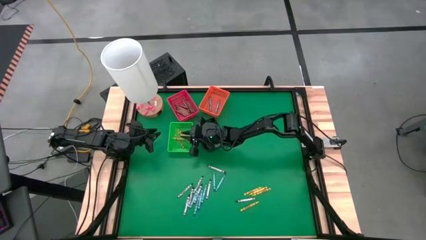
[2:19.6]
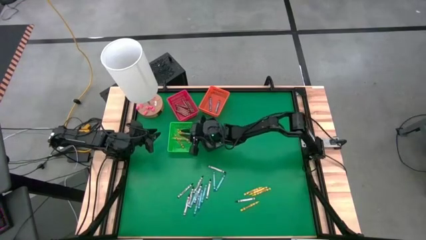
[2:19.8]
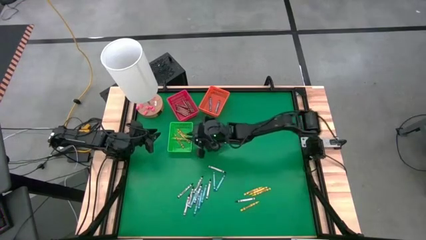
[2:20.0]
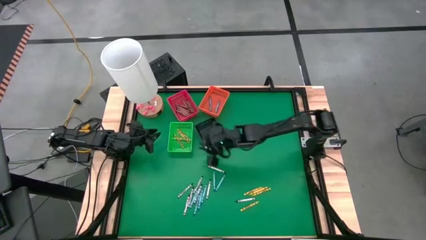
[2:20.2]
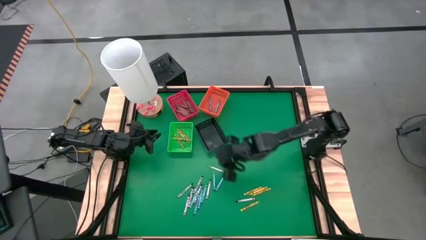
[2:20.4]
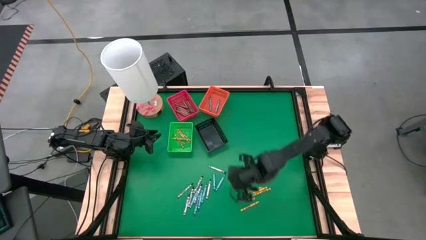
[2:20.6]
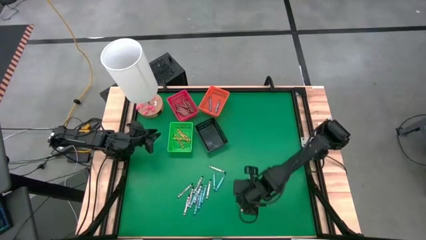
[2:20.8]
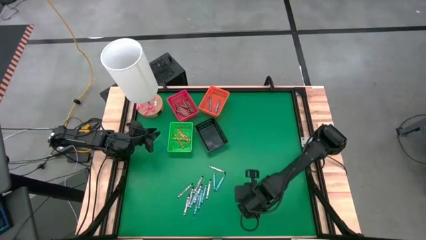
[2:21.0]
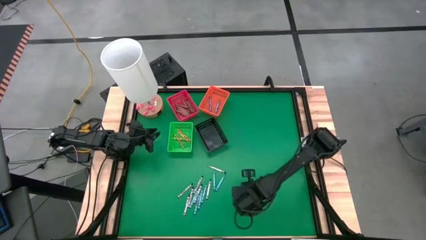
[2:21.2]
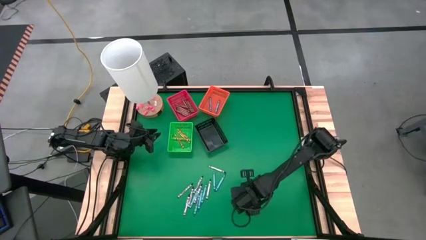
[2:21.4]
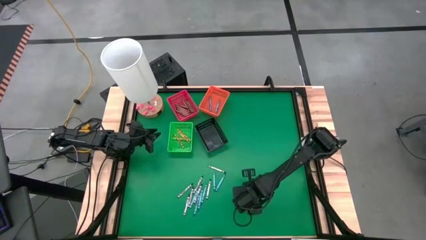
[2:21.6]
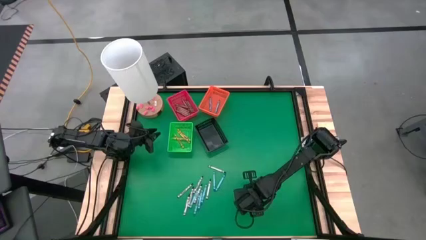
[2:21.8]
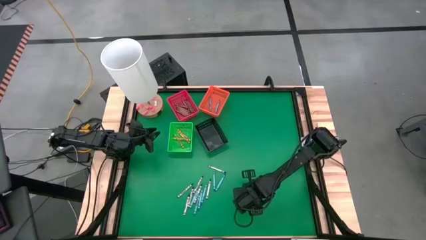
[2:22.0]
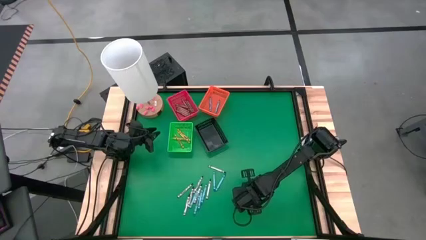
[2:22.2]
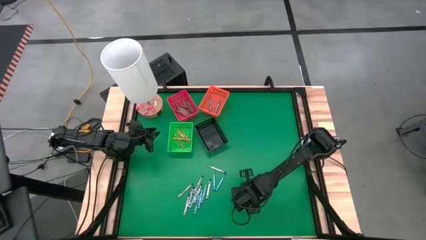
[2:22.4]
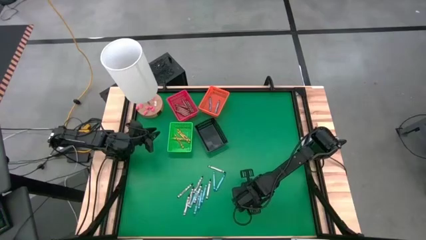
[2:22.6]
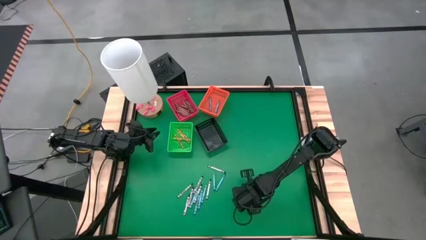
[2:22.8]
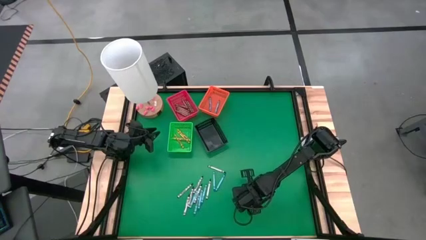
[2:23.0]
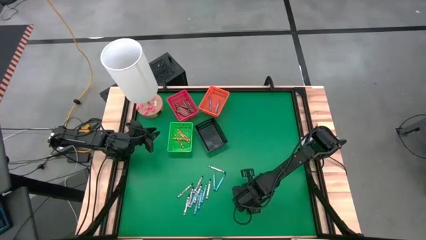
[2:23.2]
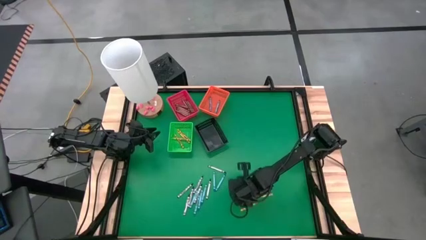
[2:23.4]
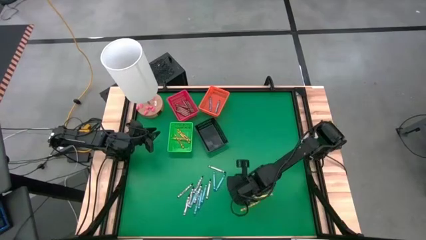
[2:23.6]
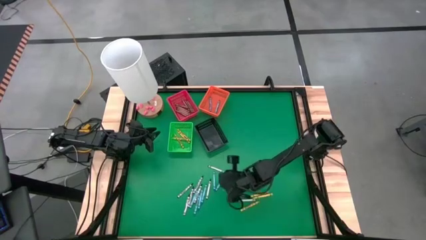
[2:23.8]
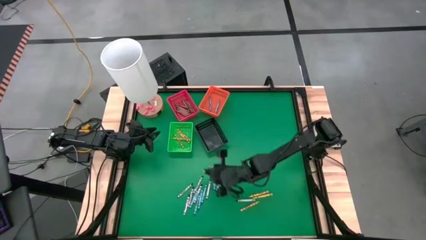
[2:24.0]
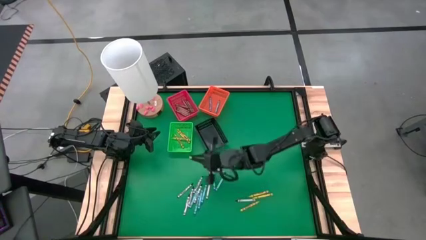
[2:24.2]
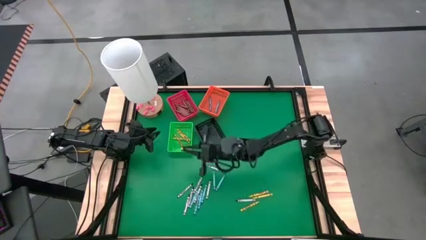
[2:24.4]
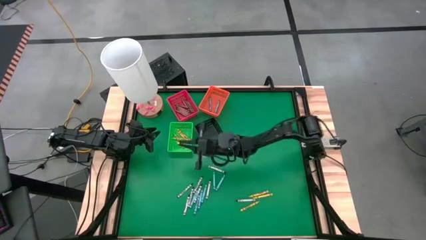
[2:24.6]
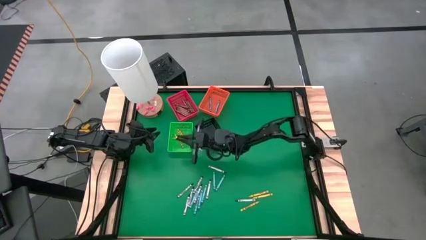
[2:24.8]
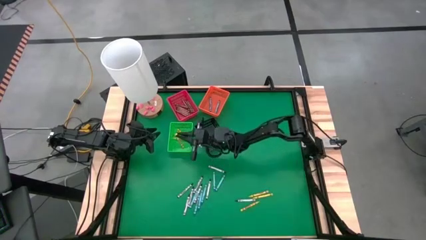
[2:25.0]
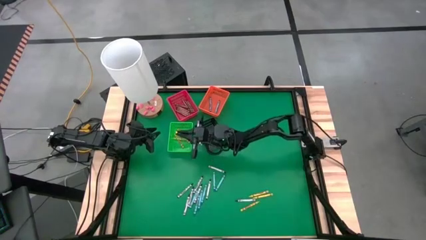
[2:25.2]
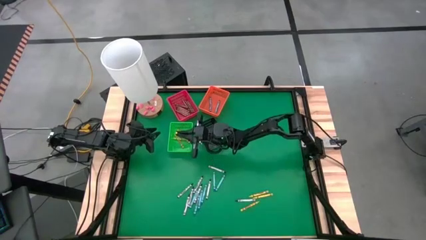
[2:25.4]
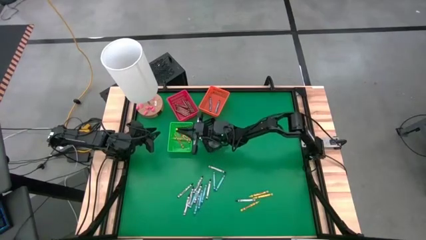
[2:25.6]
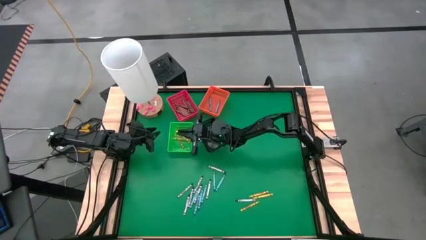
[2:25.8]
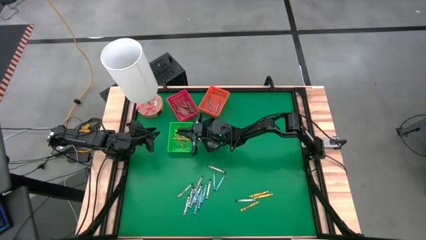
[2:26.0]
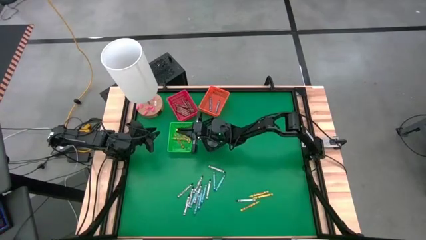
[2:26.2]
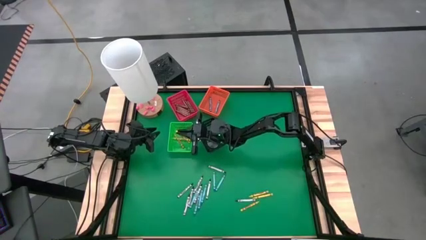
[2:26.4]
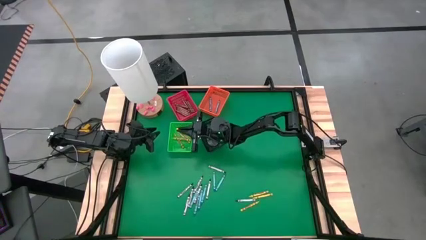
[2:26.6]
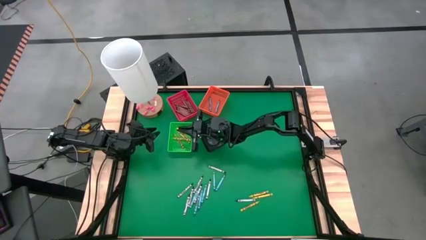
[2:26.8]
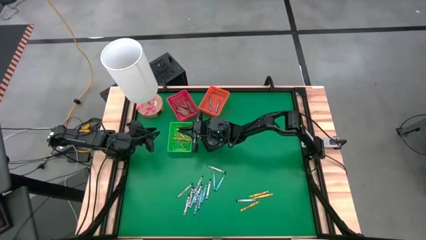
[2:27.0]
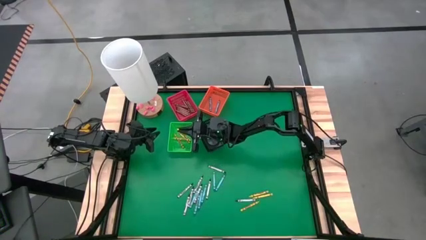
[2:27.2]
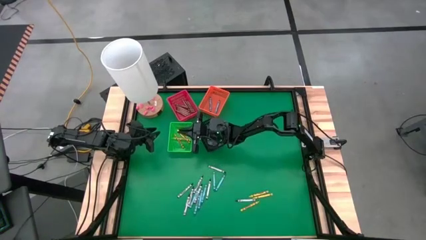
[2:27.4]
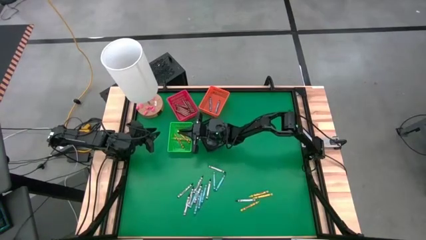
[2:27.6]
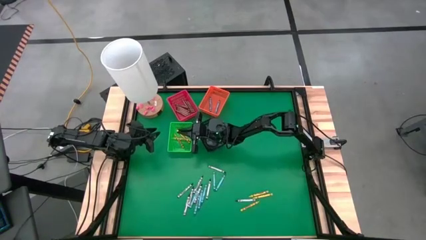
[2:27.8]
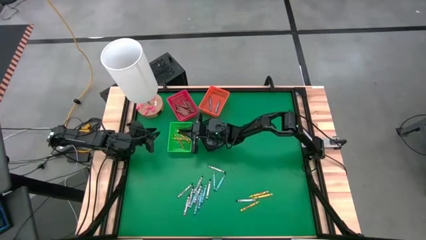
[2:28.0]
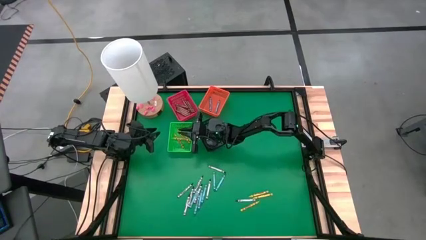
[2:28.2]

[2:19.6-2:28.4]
Task: Sort crayons
Put the yellow crayon into the green bin

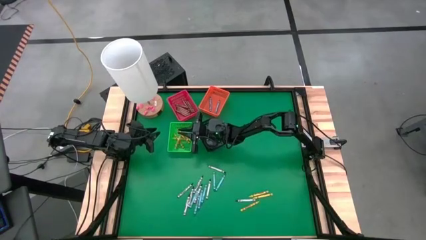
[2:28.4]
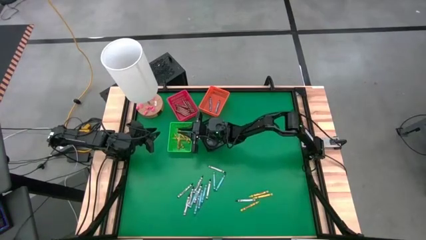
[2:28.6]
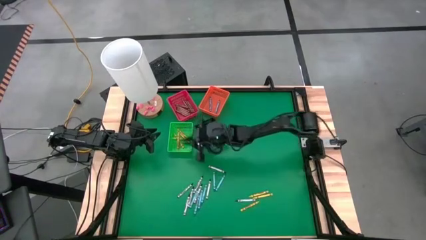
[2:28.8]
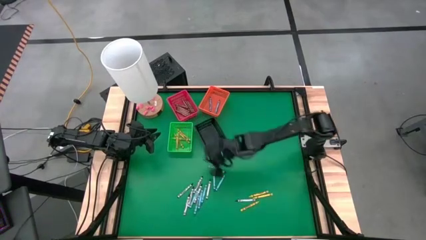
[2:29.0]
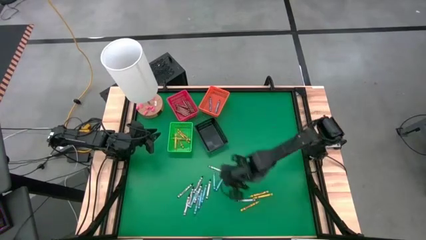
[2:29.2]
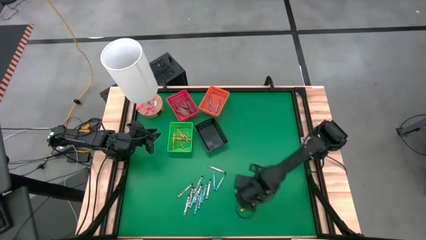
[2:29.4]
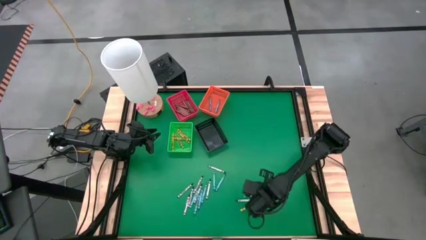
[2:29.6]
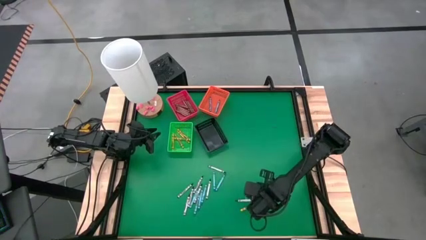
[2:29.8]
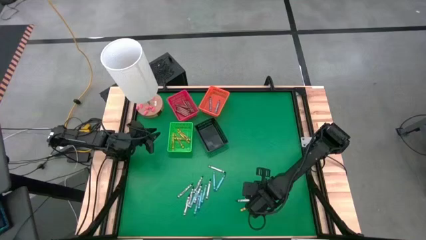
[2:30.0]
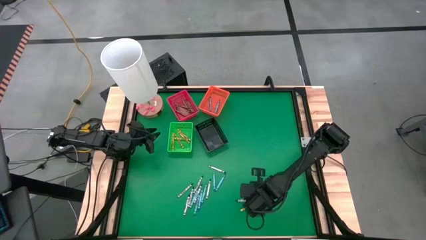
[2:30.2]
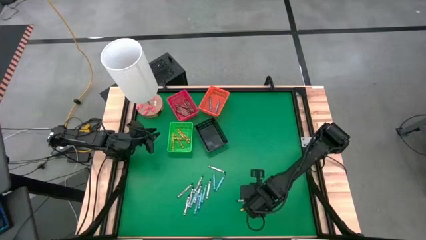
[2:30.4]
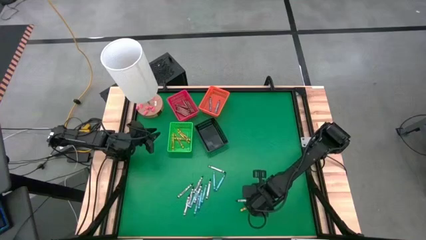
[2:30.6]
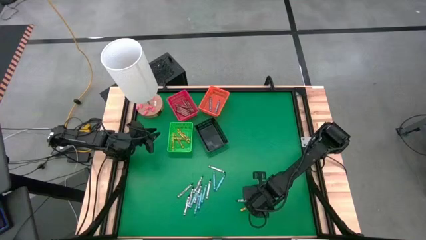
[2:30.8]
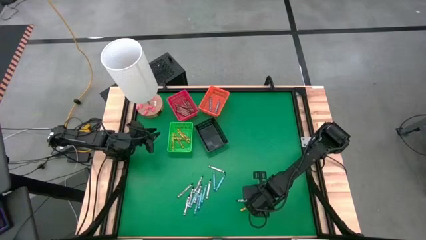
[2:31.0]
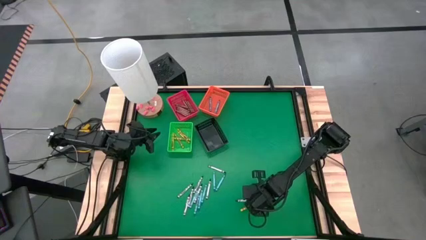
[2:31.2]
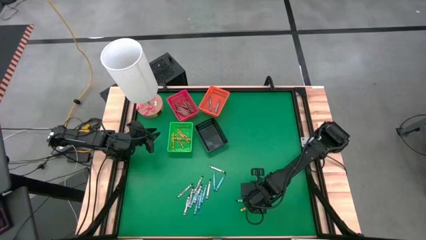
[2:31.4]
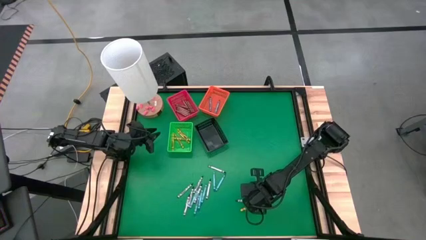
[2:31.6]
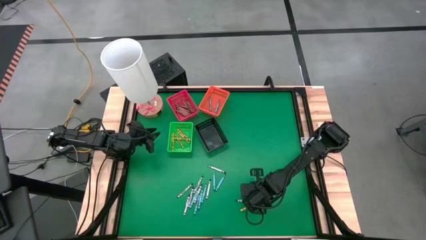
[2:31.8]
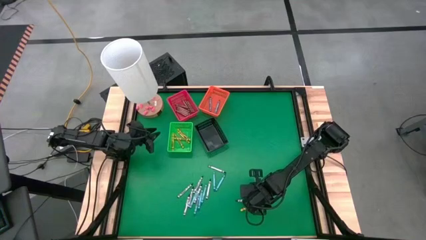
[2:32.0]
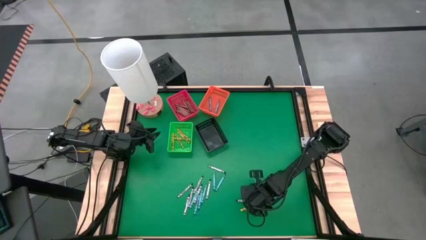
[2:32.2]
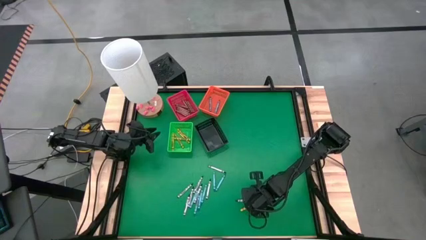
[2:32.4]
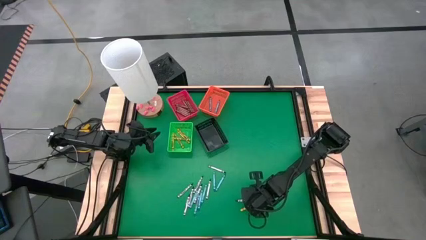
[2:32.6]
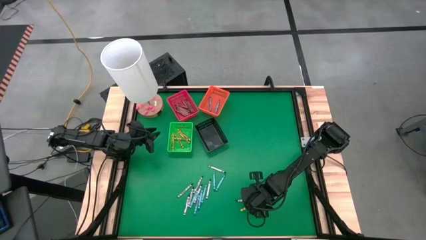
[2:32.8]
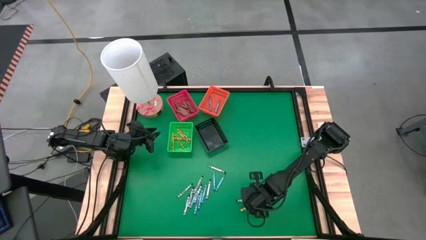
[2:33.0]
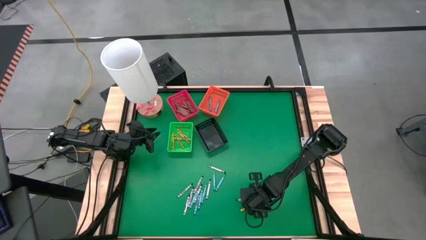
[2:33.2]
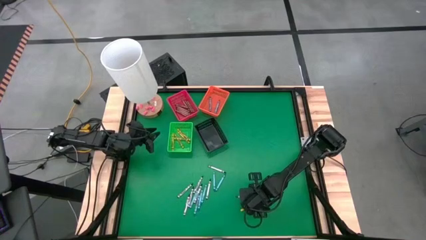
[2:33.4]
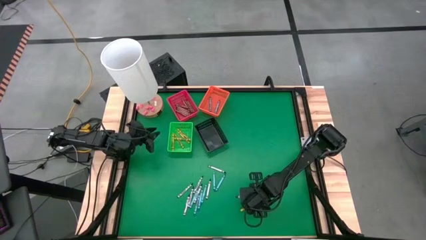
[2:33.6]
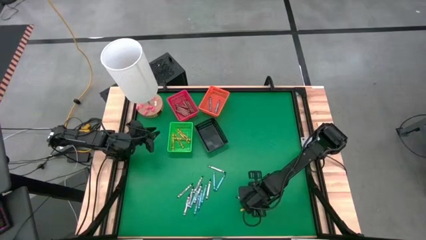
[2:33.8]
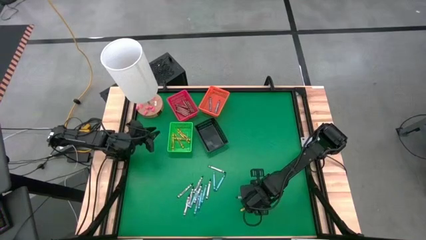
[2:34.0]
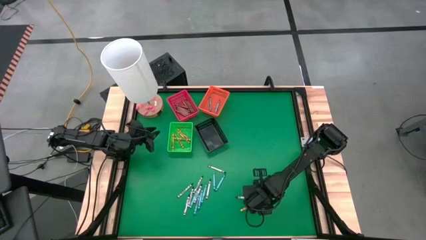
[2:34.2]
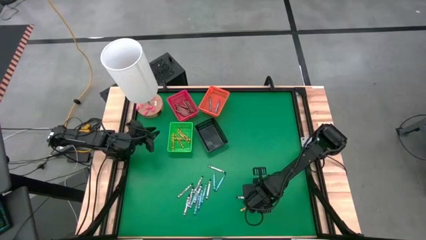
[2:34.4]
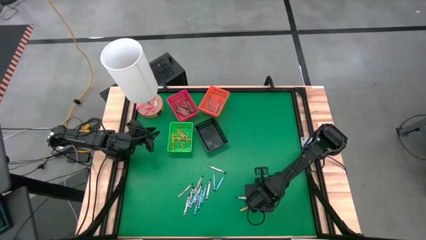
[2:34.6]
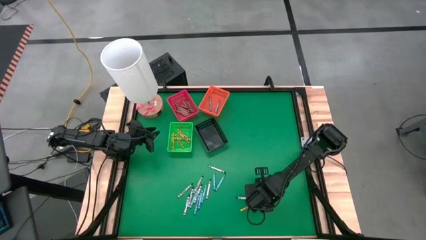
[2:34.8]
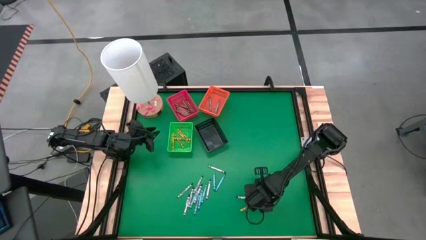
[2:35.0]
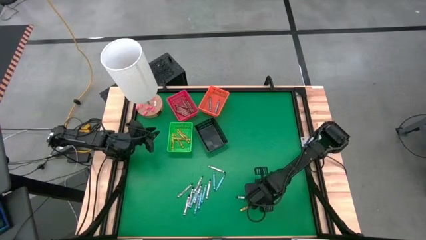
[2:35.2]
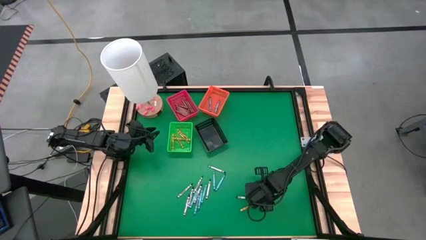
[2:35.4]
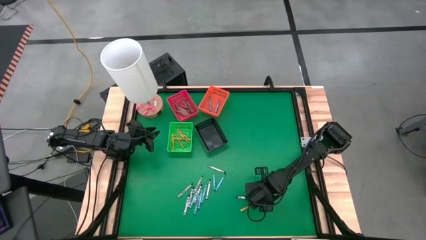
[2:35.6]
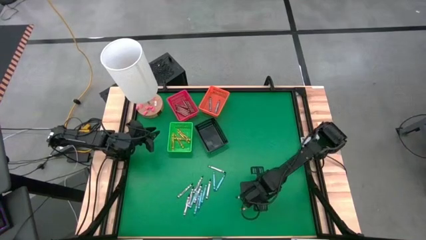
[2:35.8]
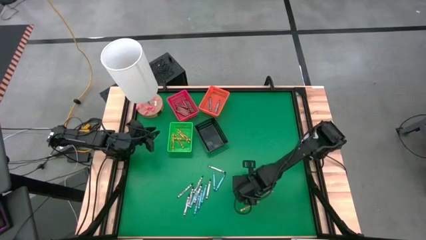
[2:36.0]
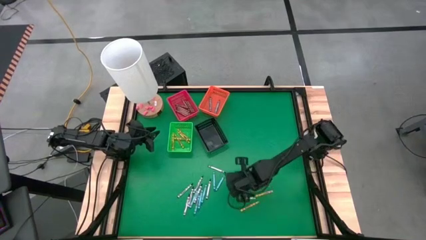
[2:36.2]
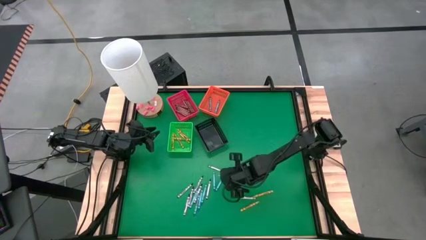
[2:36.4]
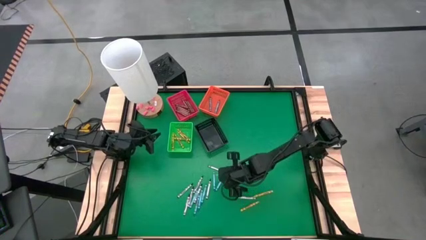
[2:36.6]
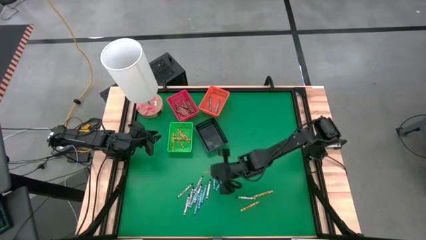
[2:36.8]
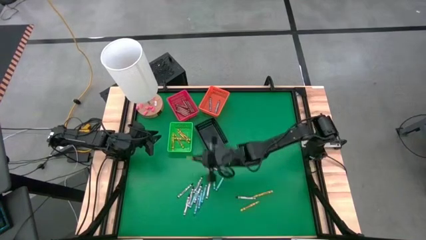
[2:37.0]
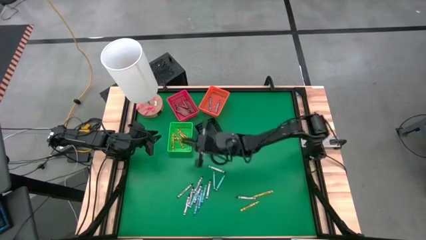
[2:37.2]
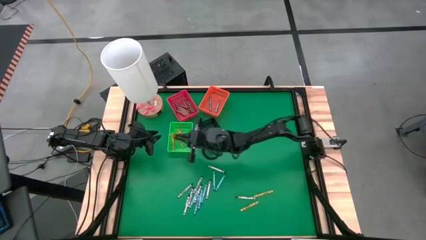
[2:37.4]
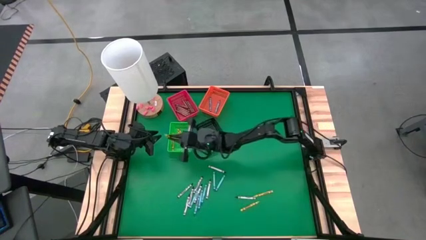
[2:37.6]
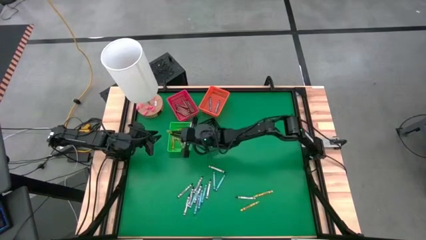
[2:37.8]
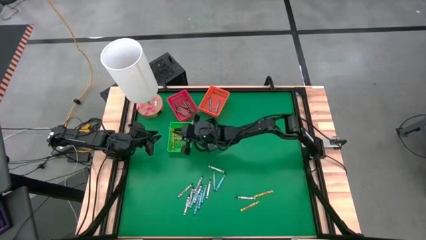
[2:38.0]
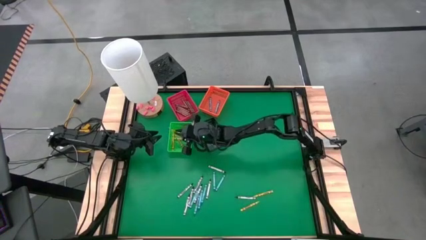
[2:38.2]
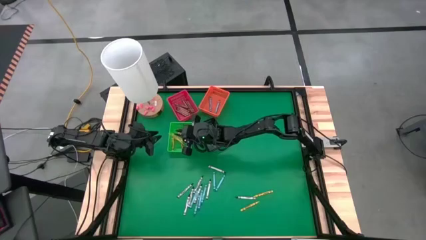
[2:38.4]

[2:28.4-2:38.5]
Put the yellow crayon into the green bin
